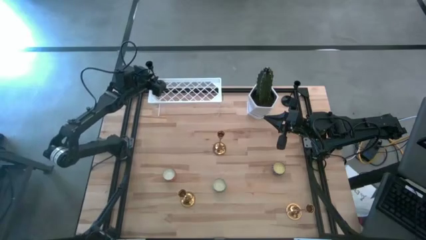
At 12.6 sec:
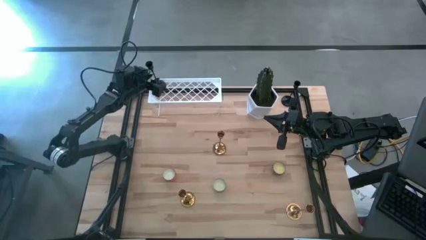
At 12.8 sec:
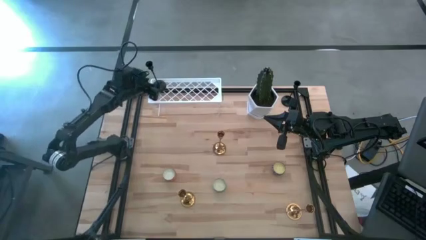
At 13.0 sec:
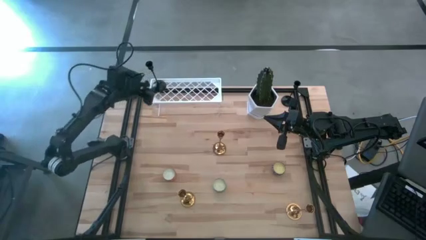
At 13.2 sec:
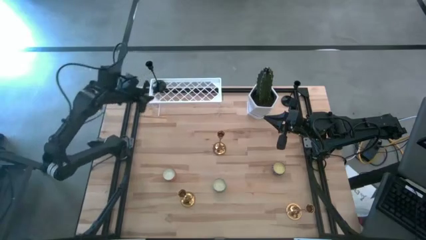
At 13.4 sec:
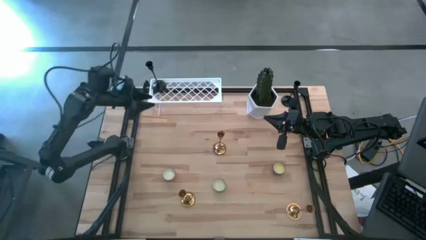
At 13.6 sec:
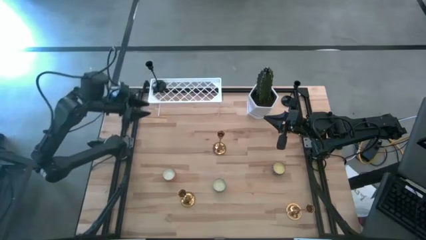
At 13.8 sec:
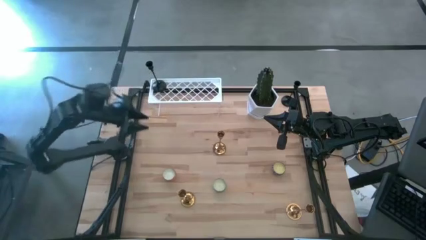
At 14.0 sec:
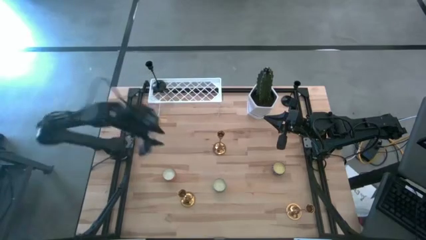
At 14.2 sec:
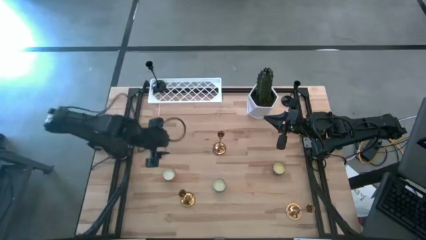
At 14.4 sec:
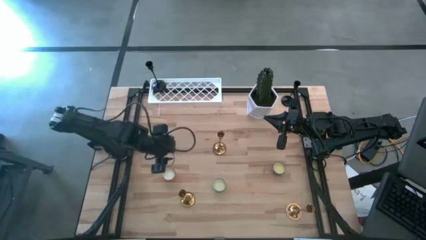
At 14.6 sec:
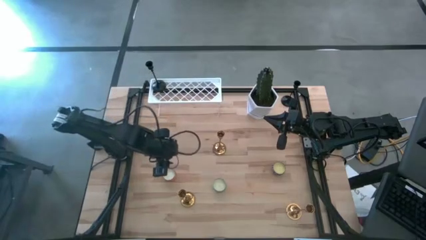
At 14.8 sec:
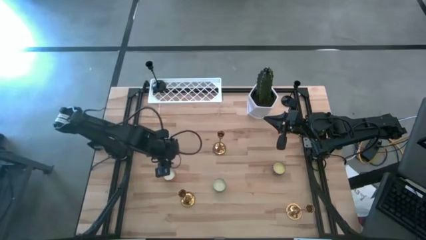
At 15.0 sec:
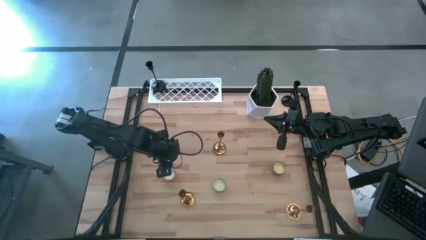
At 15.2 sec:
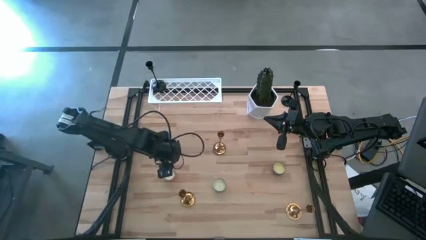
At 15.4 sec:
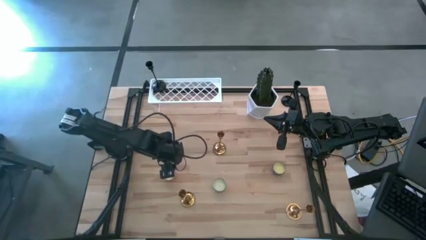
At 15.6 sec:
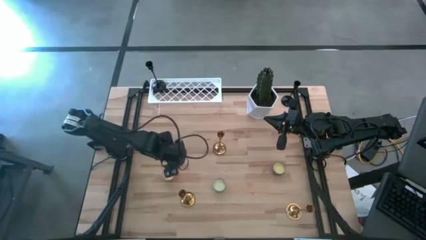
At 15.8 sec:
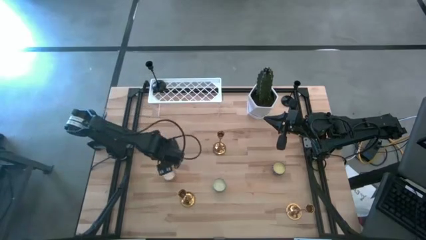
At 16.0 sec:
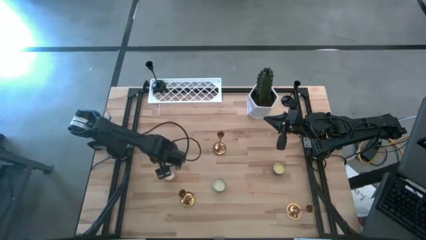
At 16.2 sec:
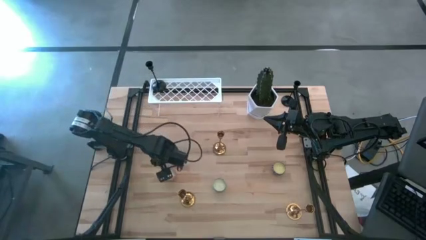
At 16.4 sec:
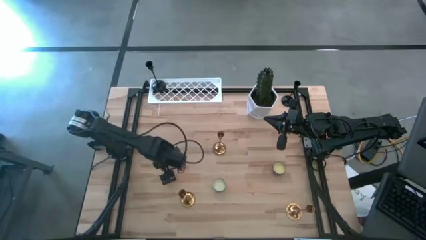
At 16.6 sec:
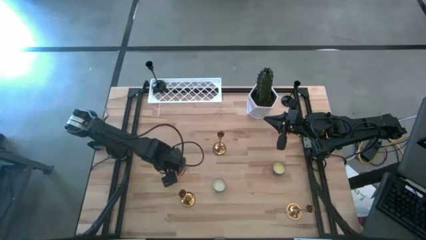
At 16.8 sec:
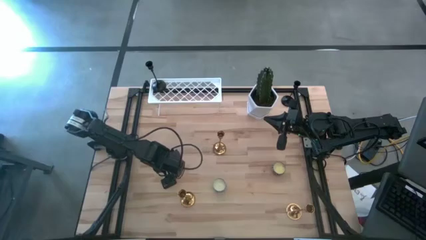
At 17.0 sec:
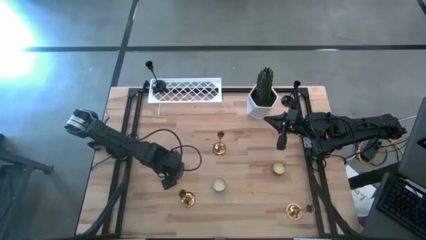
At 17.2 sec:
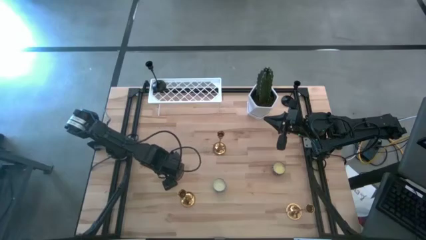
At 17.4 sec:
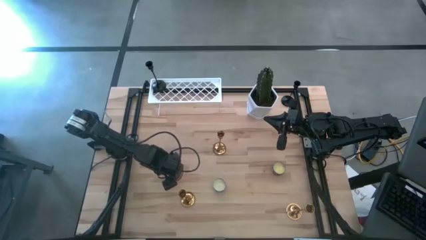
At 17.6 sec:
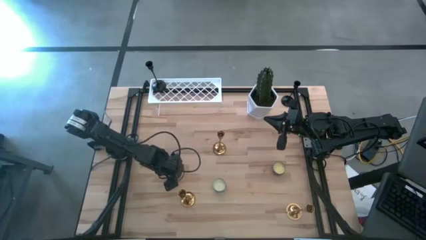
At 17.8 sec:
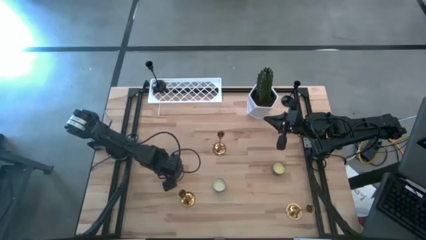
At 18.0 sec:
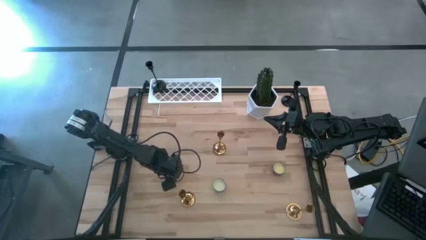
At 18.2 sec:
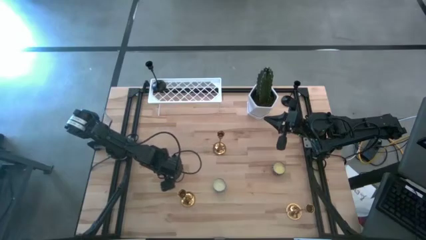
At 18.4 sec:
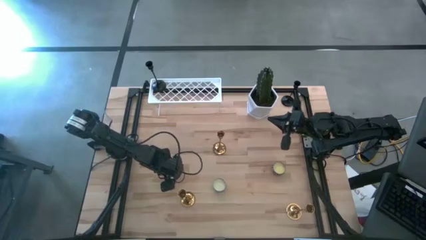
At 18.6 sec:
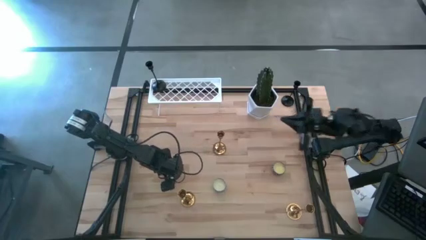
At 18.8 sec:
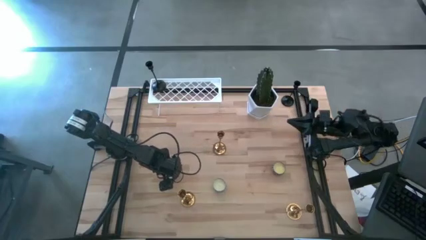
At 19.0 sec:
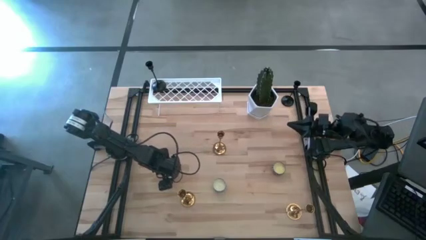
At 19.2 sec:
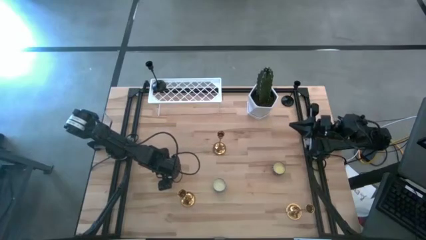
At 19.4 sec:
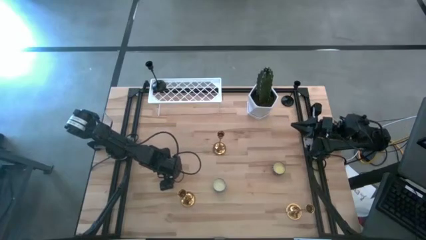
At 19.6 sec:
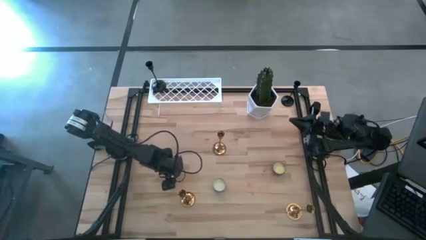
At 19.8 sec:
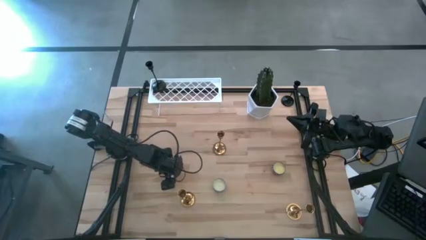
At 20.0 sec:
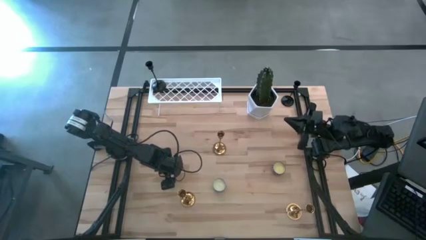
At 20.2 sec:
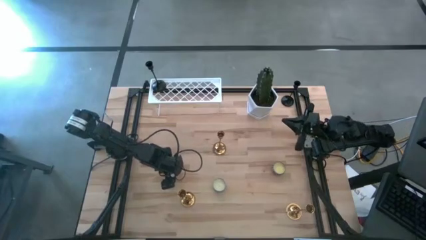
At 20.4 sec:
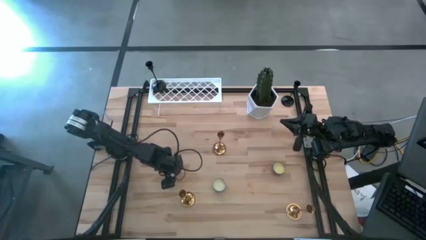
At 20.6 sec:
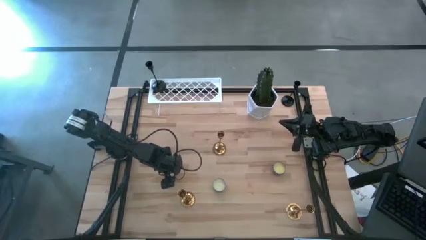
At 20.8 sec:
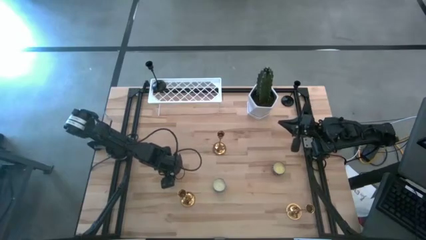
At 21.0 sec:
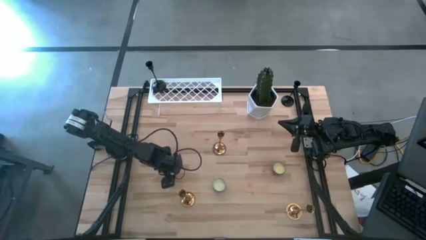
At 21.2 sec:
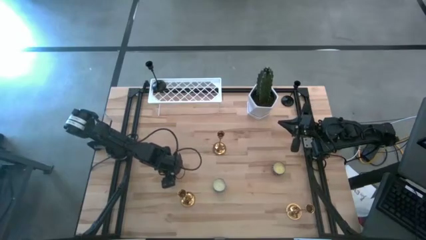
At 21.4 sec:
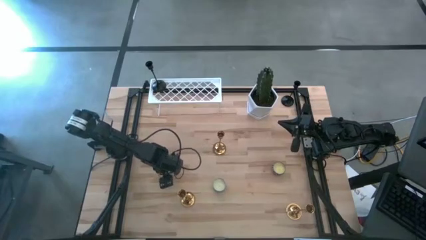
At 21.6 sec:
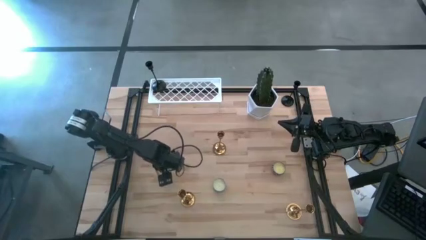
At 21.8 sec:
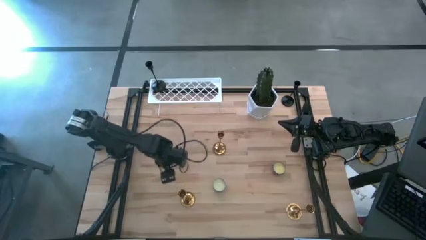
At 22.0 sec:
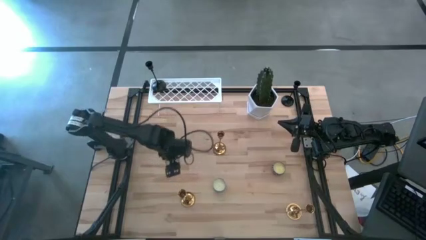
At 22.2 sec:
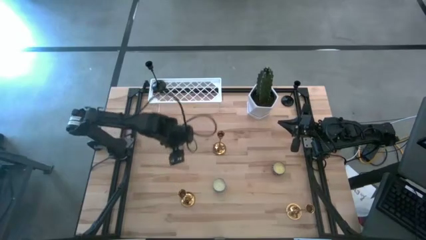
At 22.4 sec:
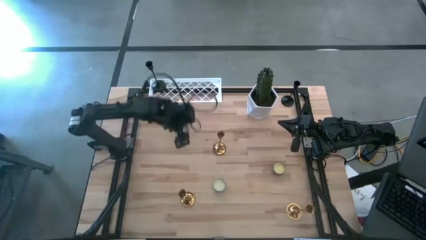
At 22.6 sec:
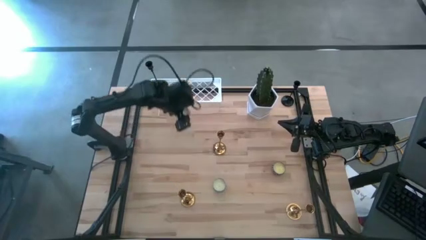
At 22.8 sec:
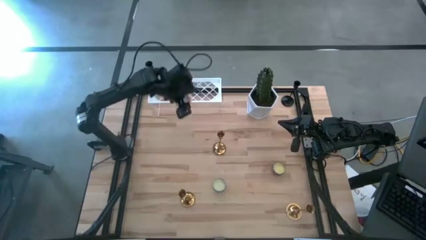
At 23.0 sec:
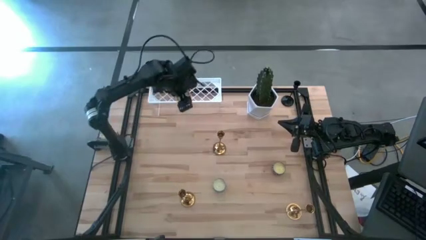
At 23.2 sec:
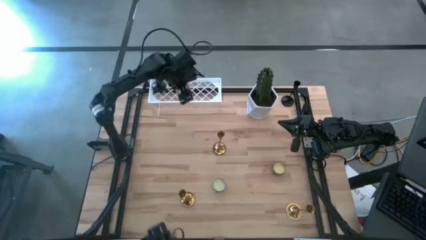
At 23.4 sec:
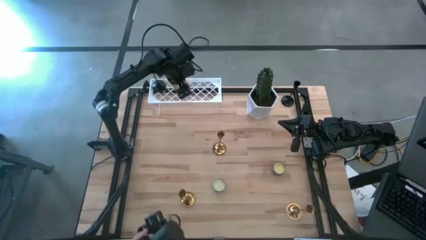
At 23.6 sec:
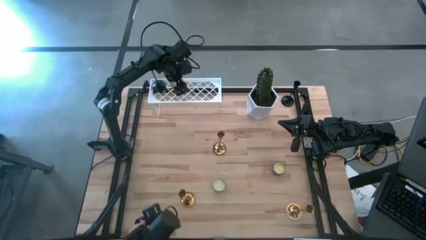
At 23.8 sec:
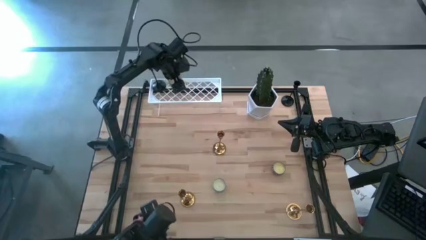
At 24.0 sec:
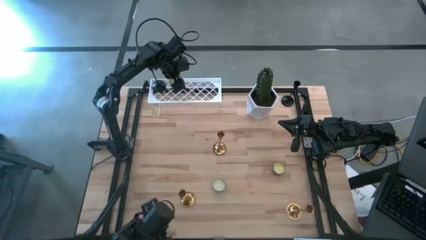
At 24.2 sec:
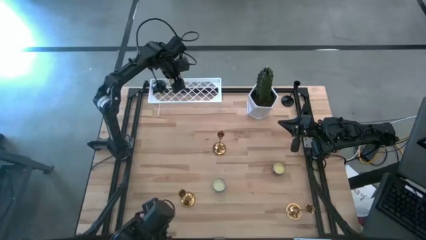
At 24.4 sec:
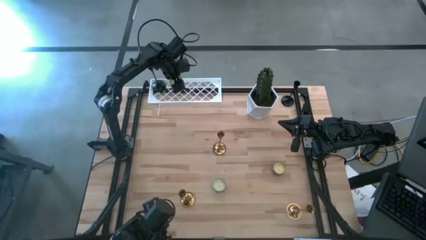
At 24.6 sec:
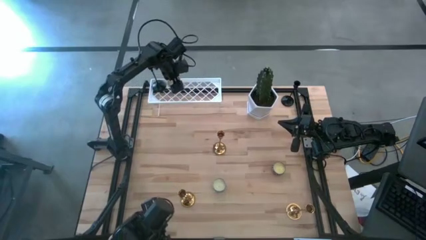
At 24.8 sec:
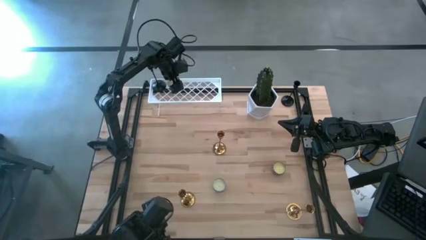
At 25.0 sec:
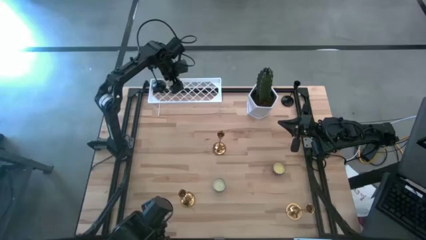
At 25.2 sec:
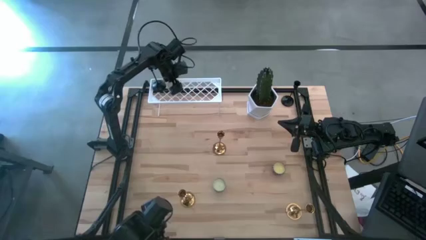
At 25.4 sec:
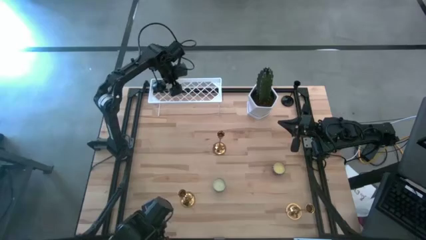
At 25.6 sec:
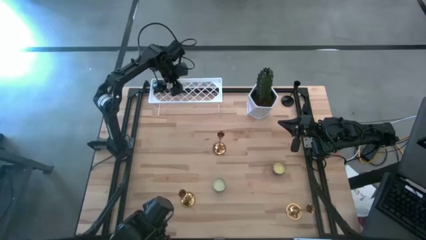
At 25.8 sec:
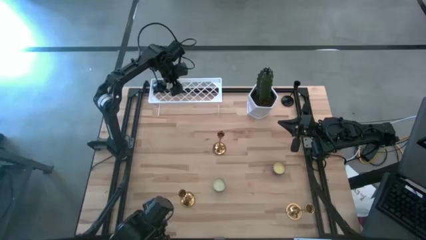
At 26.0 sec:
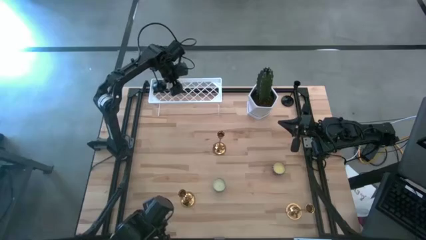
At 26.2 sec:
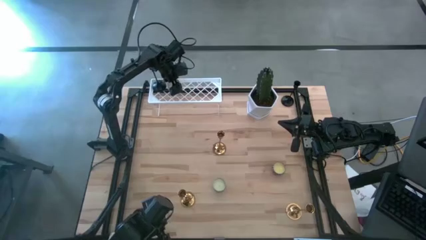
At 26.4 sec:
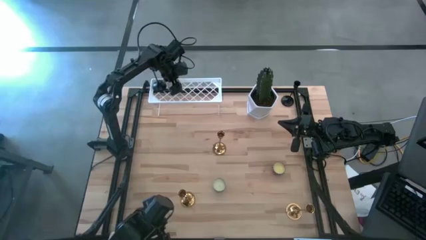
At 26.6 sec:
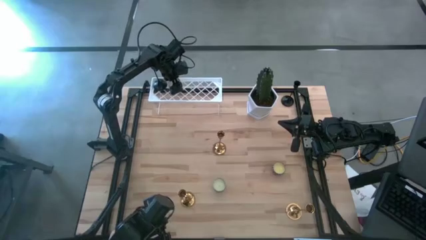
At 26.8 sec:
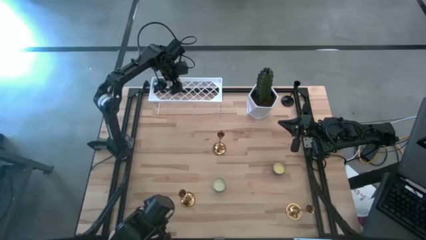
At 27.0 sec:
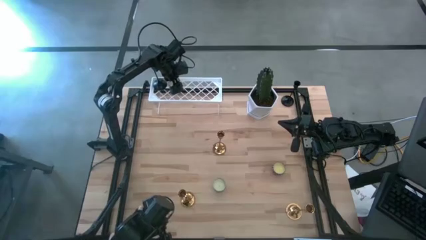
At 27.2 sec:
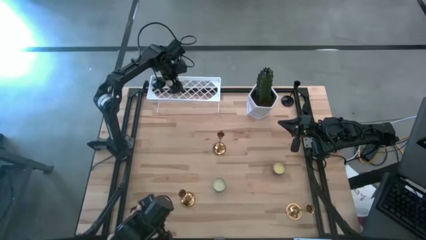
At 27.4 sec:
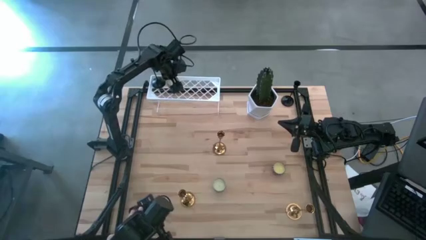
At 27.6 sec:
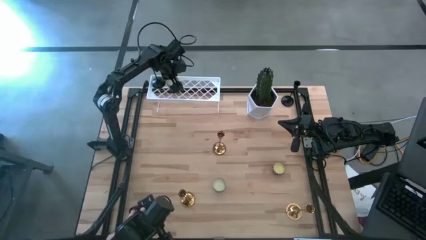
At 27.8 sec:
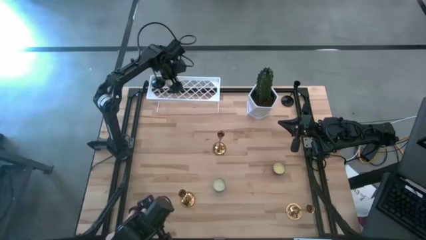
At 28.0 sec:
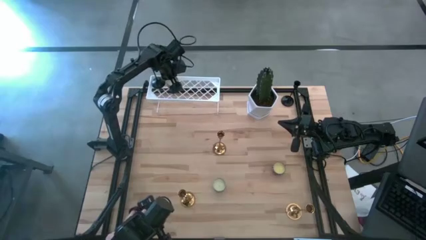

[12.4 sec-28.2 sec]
Task: Pick & Place candle stick holders
Put the orange scented candle on the shelf
